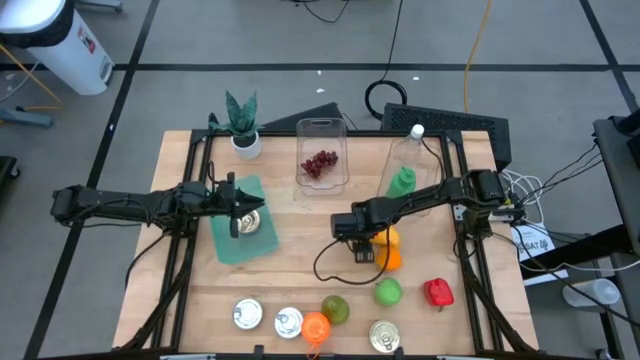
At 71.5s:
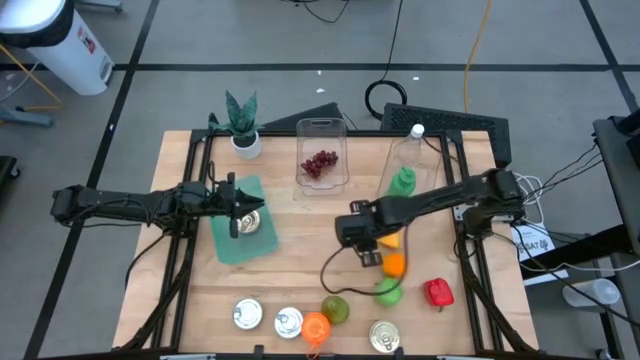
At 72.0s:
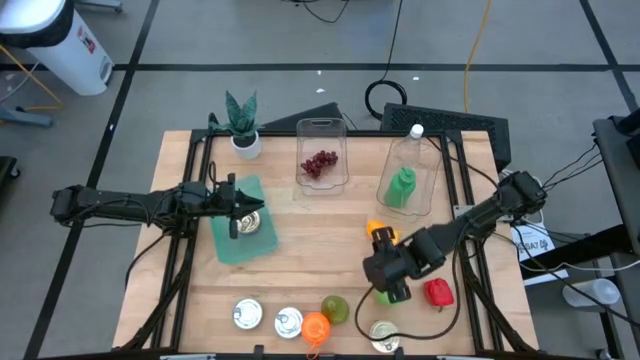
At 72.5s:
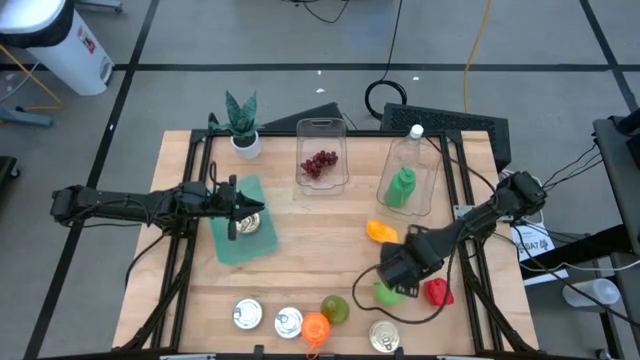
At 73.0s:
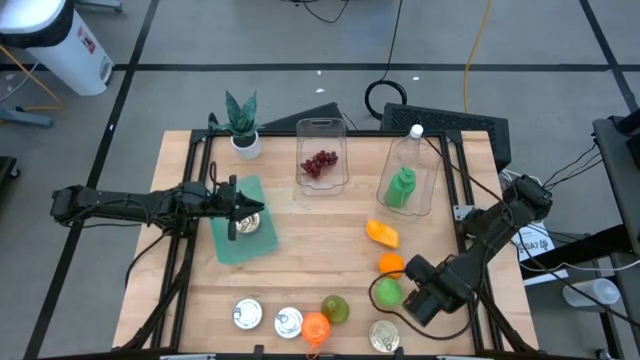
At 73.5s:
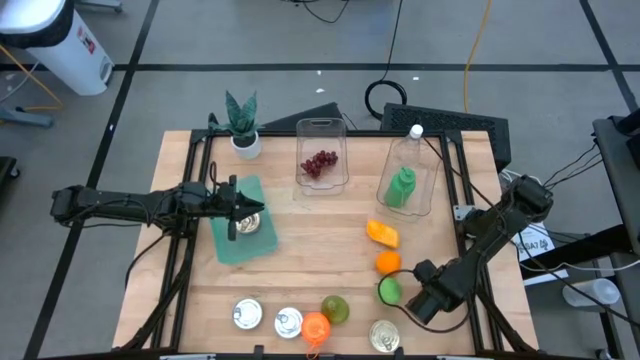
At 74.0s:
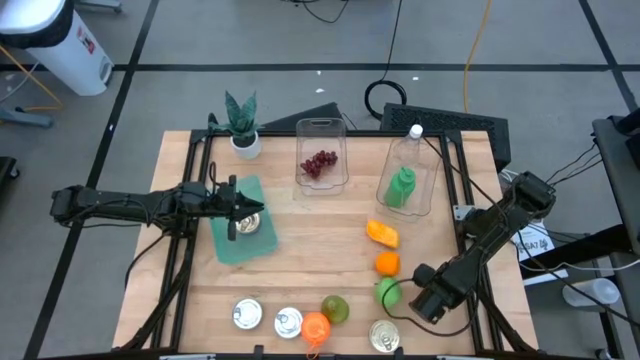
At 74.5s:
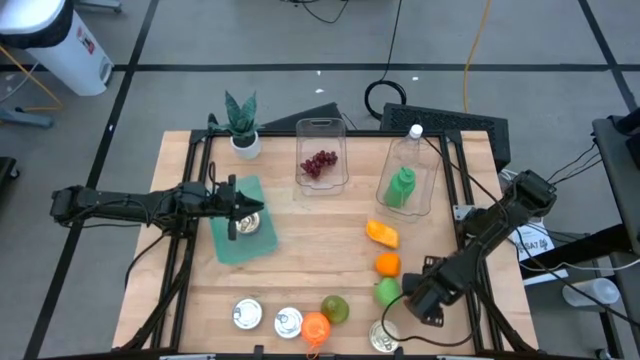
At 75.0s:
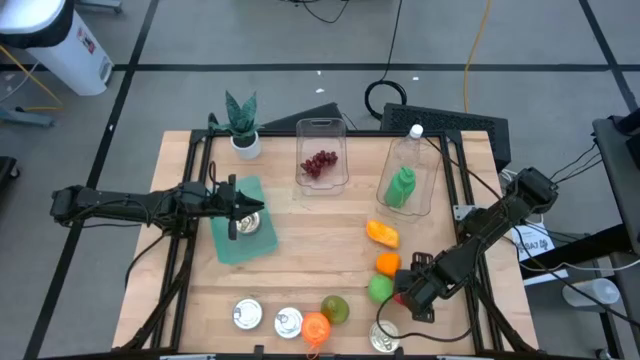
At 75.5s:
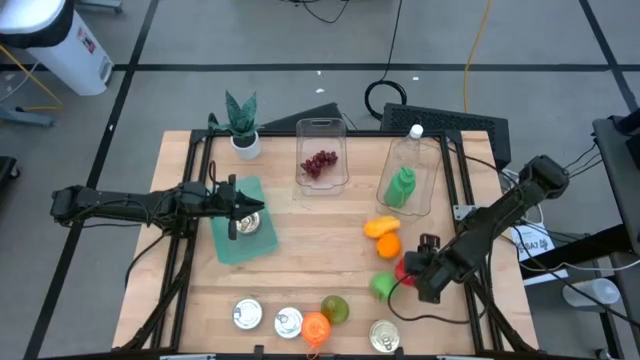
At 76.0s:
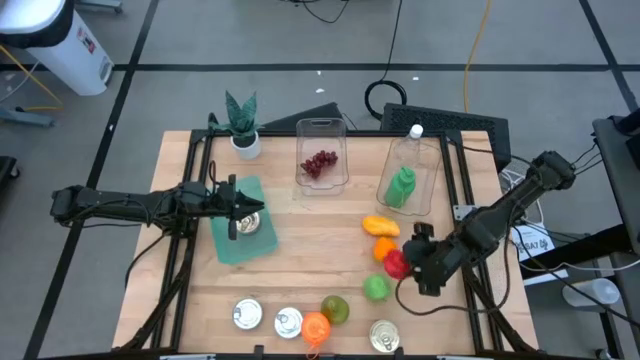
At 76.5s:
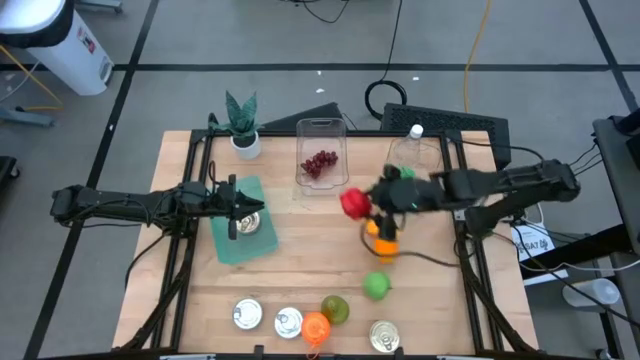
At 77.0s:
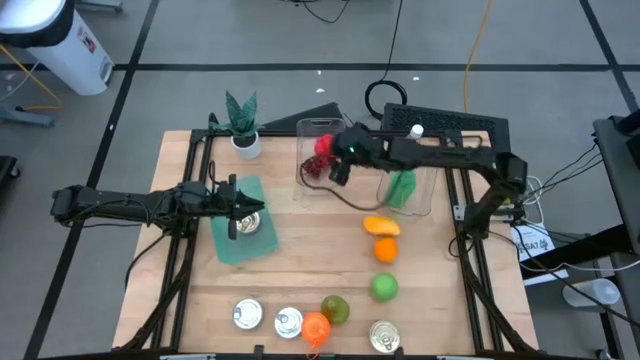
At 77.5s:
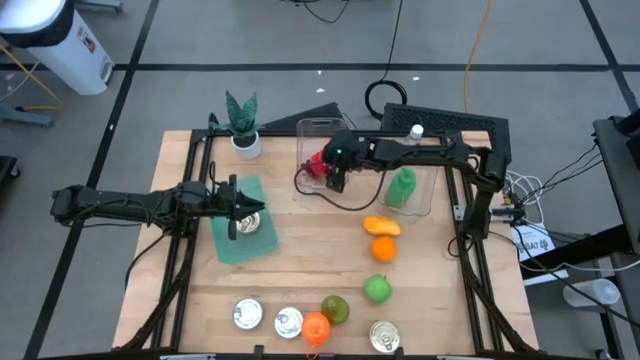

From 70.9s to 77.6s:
Task: Pick & Place Food Item
Put the red bell pepper into the left transparent bin

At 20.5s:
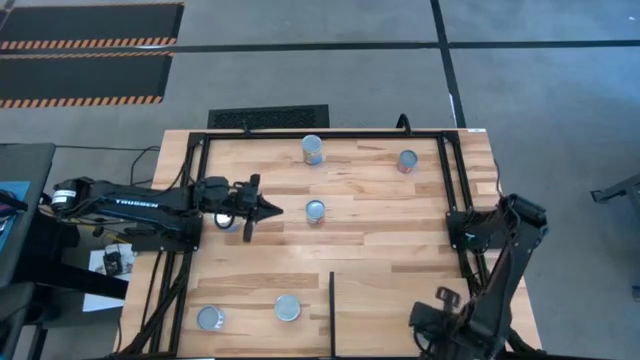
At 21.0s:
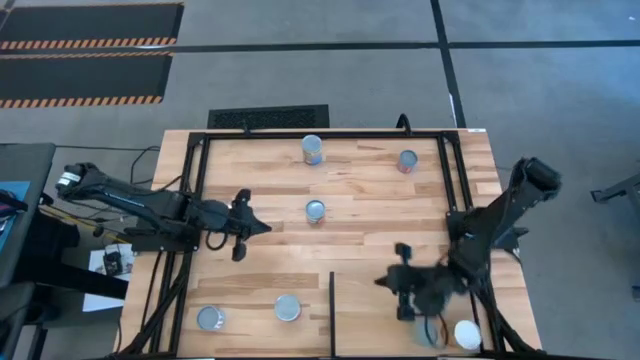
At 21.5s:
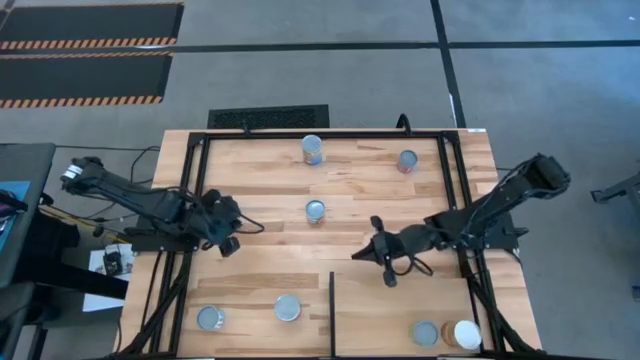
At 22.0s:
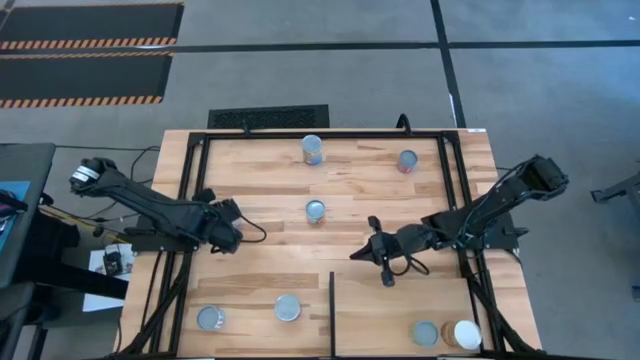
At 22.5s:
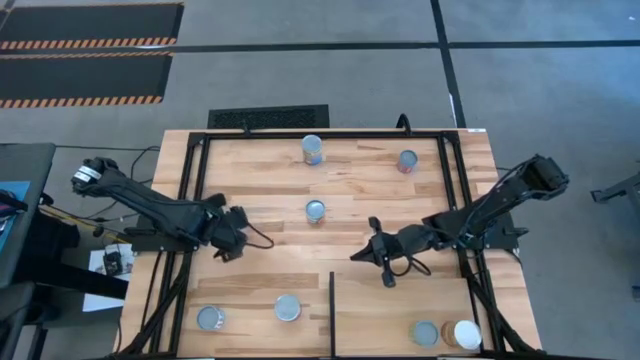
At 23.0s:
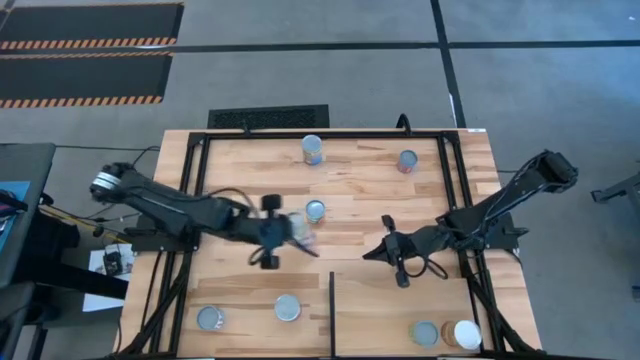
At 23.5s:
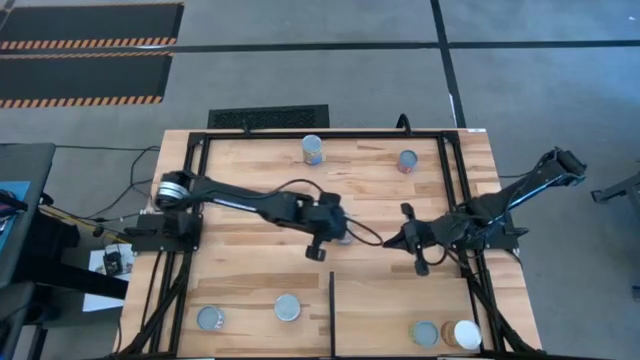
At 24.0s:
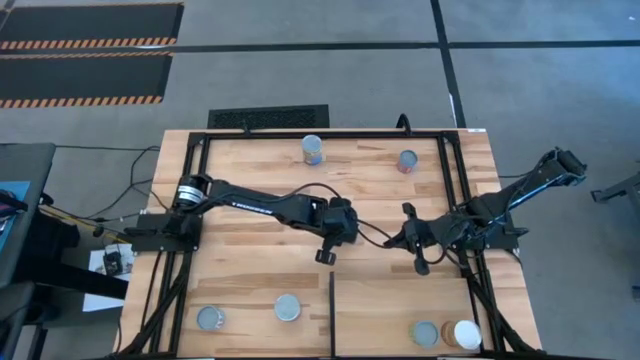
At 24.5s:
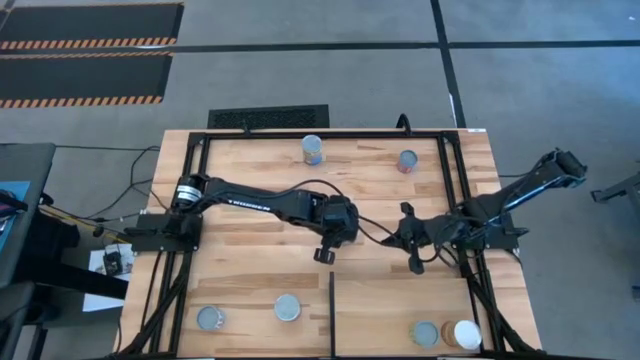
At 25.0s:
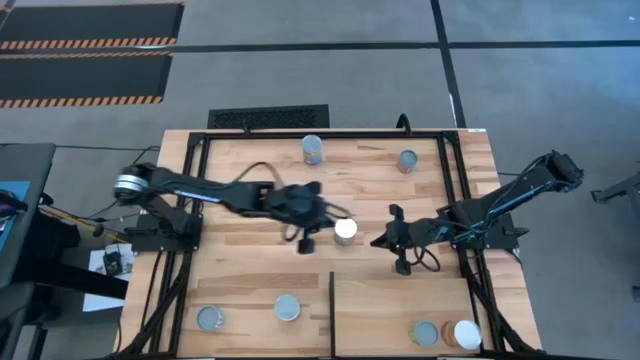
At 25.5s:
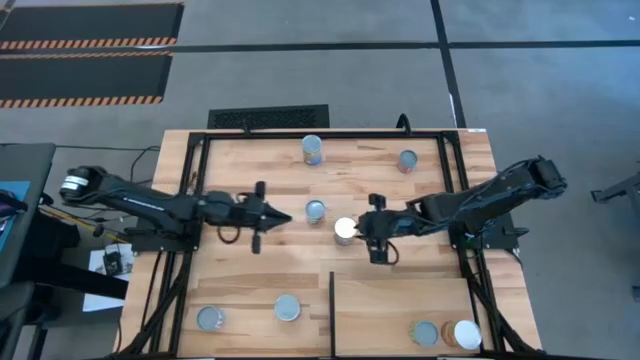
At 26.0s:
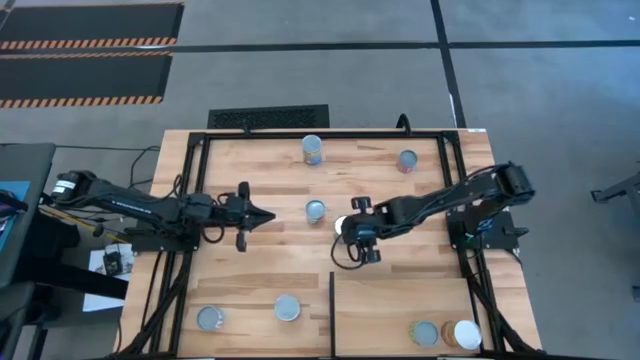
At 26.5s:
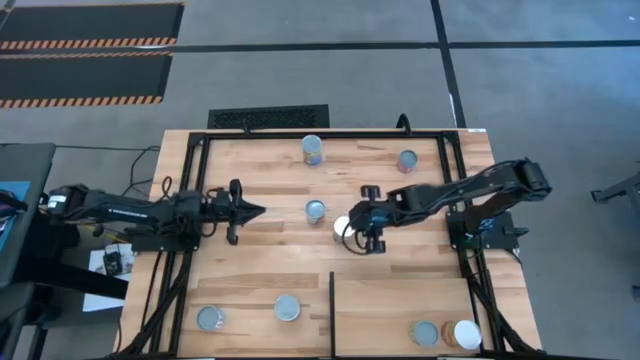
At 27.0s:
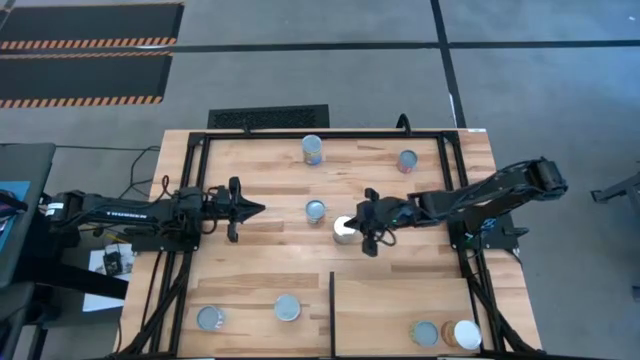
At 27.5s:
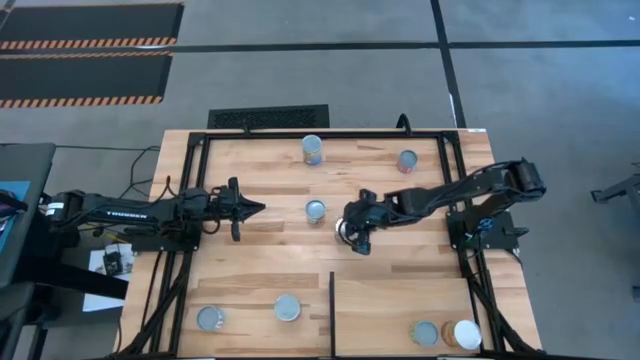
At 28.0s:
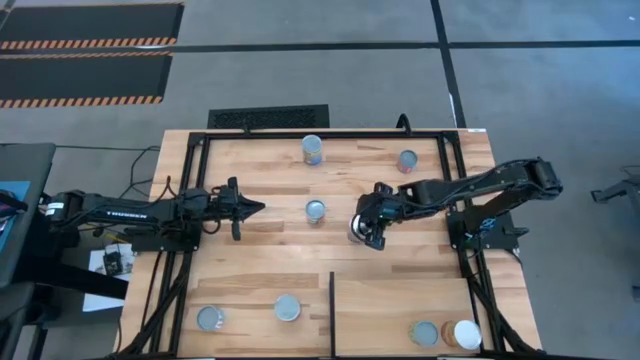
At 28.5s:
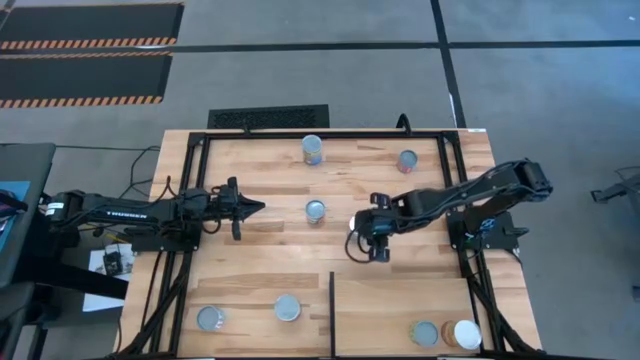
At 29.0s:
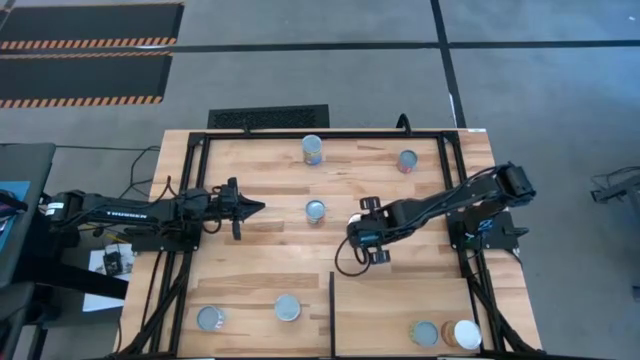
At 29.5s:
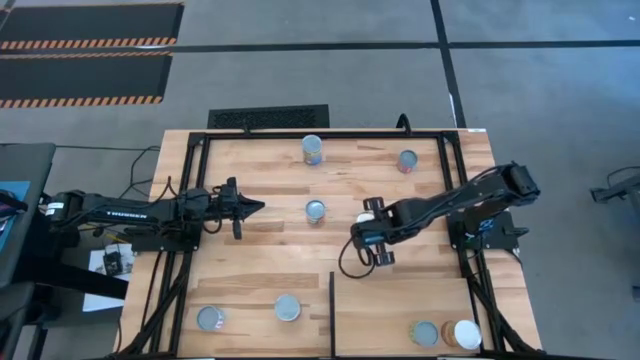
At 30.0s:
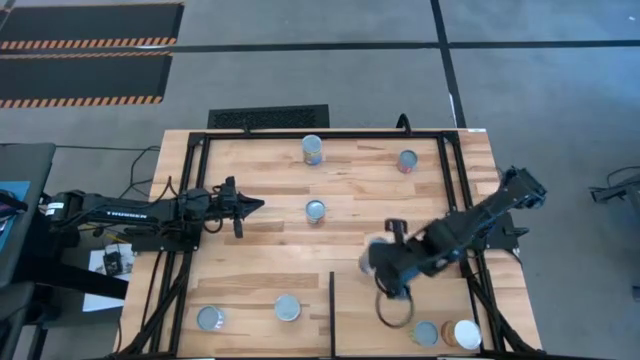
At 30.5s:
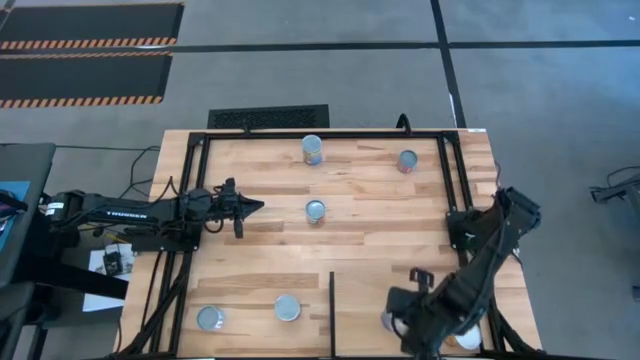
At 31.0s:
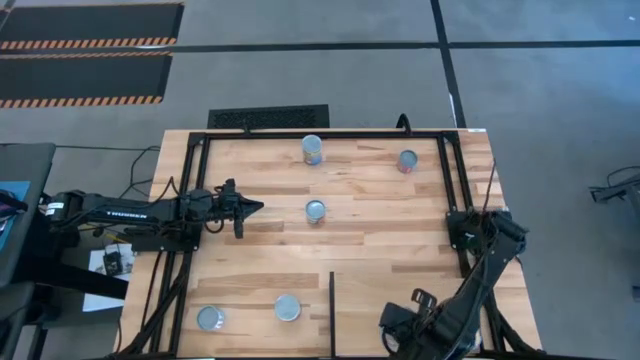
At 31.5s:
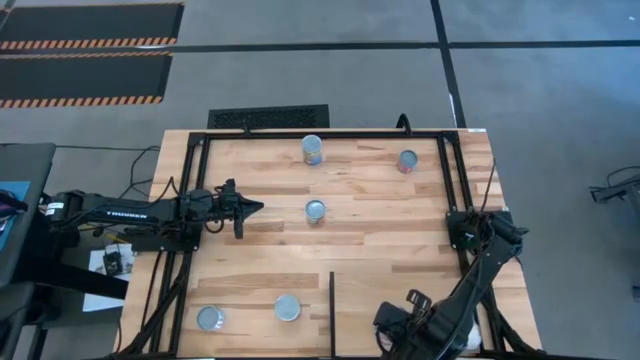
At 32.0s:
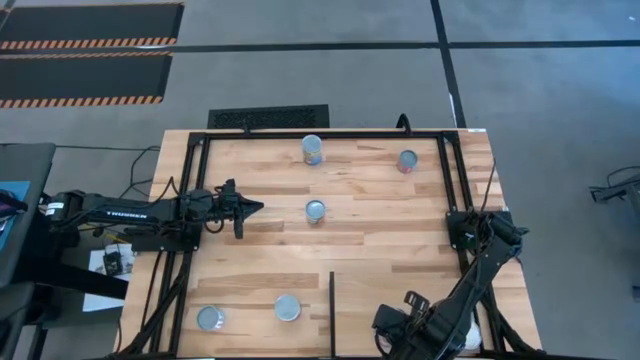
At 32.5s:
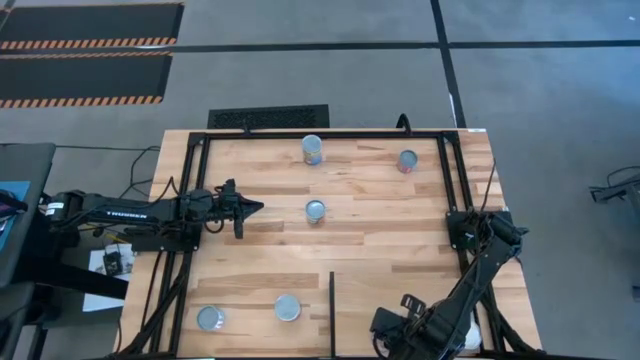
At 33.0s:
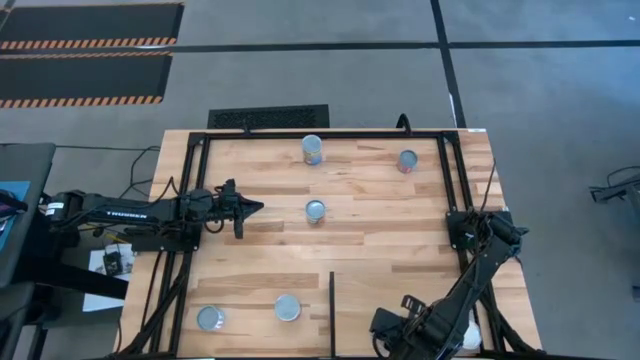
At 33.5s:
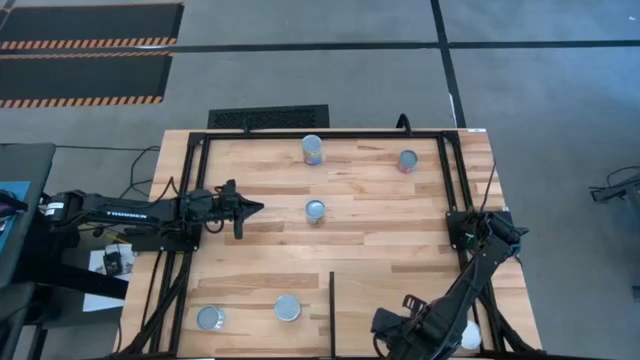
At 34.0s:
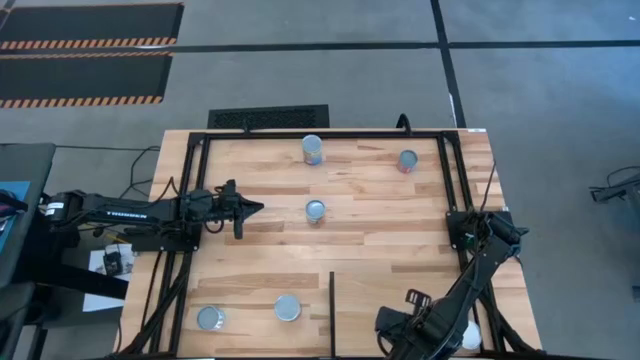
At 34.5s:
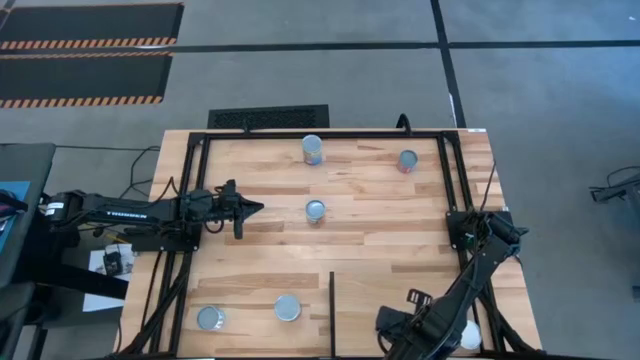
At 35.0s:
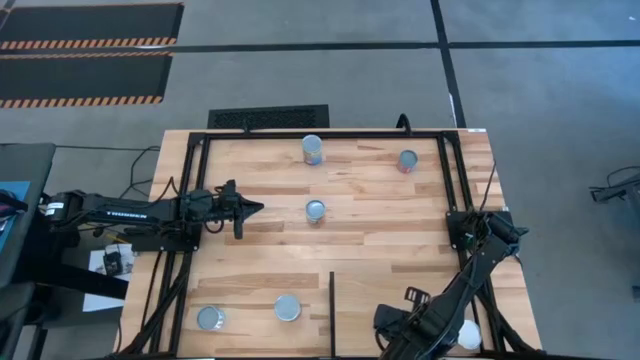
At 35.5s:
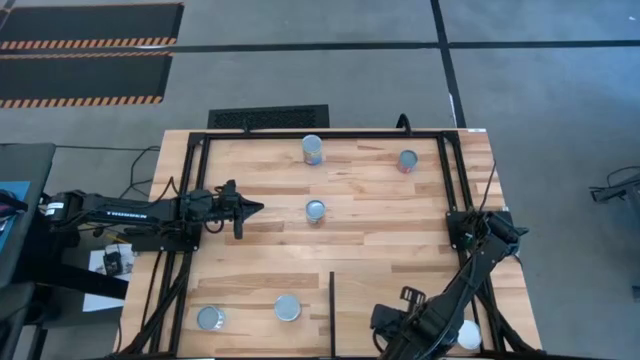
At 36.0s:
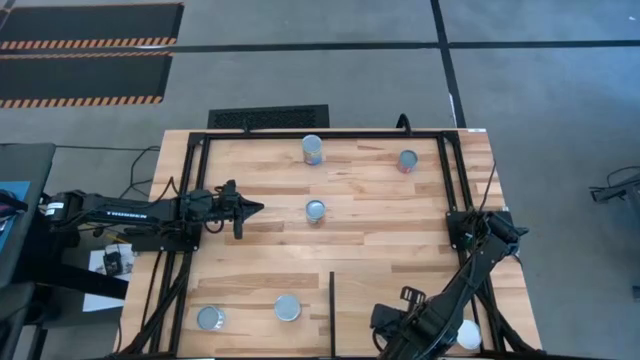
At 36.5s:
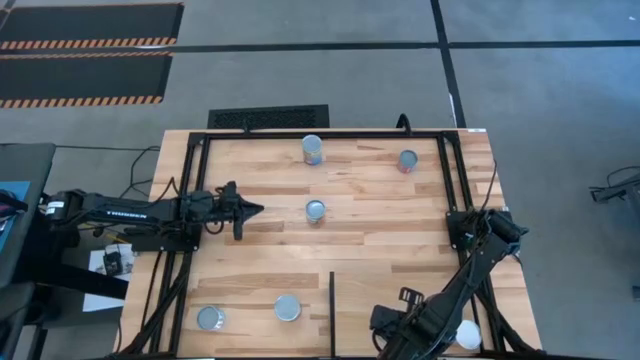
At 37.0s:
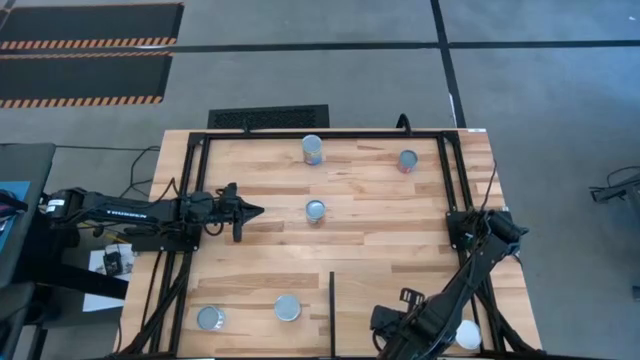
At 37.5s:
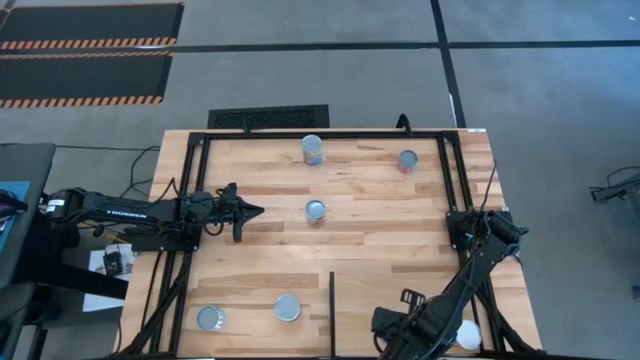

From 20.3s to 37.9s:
Task: Pick and place cans onto a shelf
Put the bottom canned peaches on the shelf
